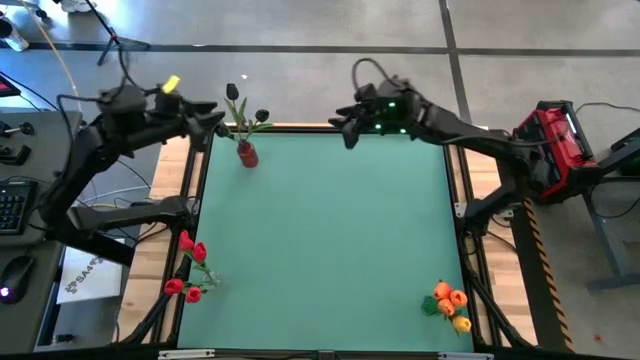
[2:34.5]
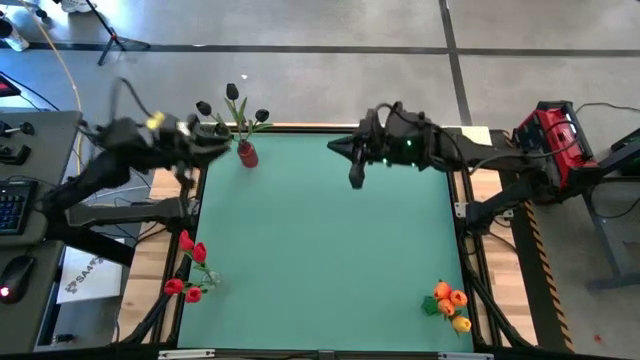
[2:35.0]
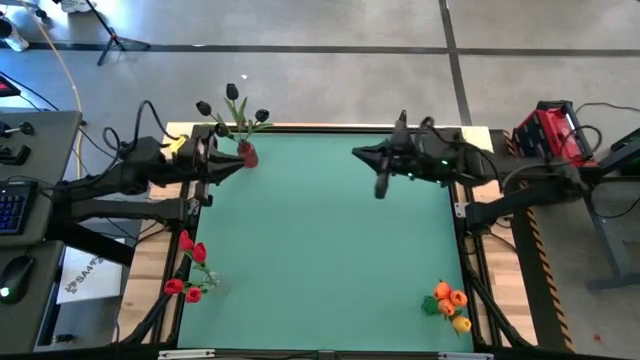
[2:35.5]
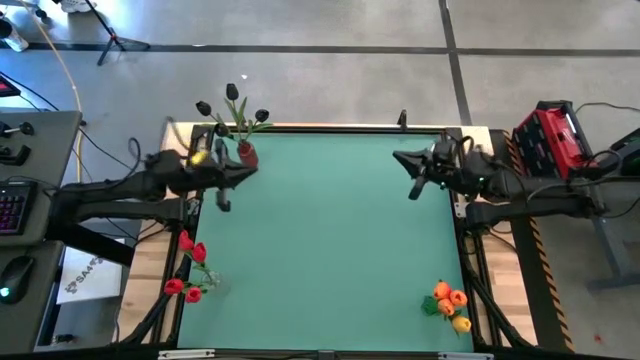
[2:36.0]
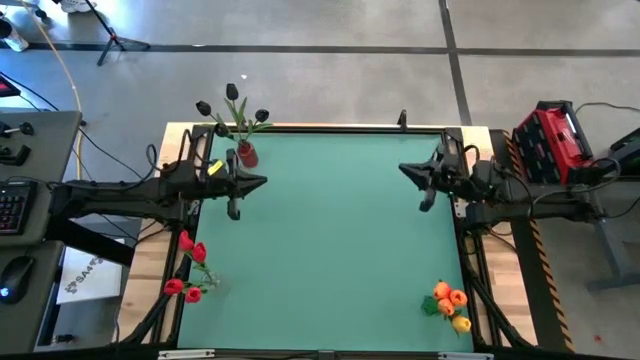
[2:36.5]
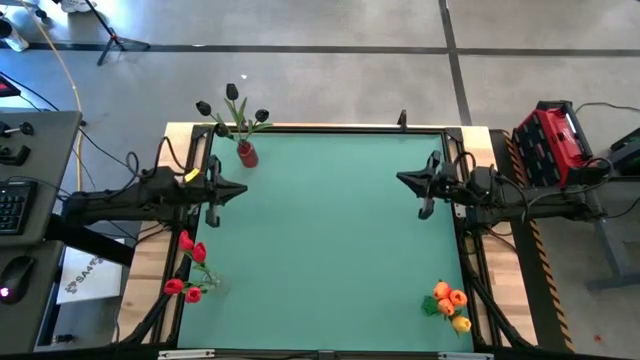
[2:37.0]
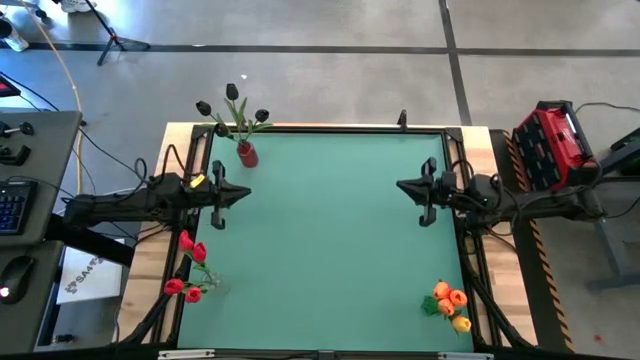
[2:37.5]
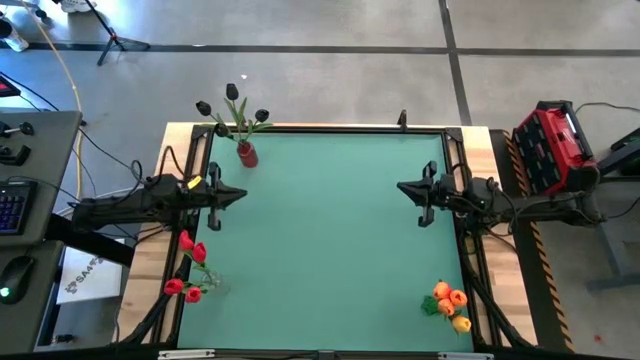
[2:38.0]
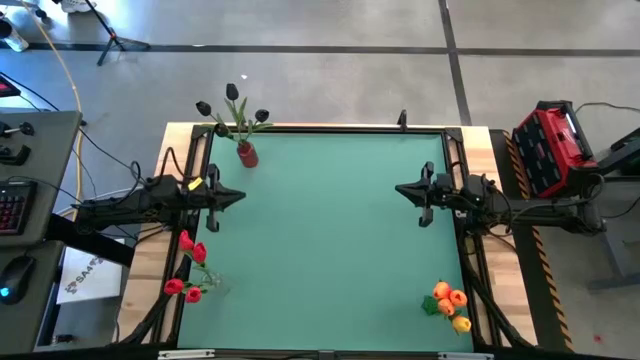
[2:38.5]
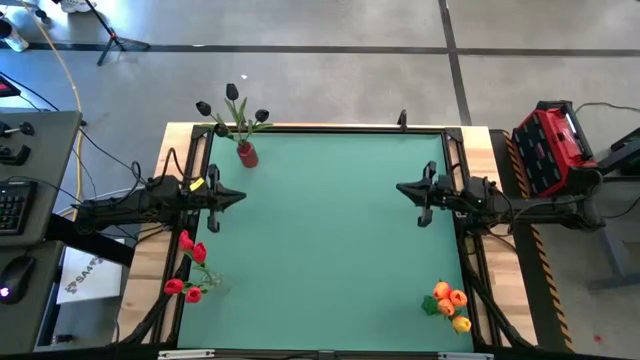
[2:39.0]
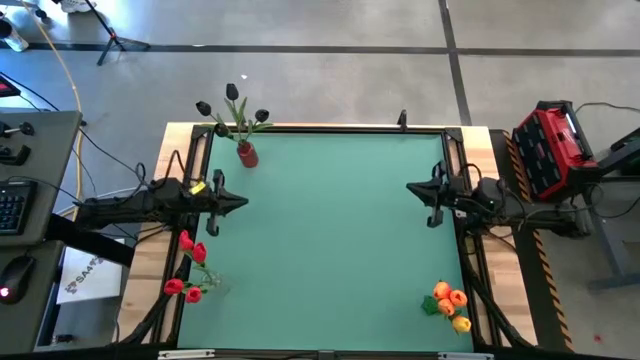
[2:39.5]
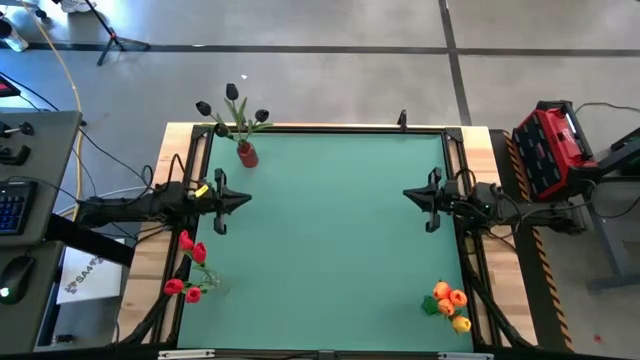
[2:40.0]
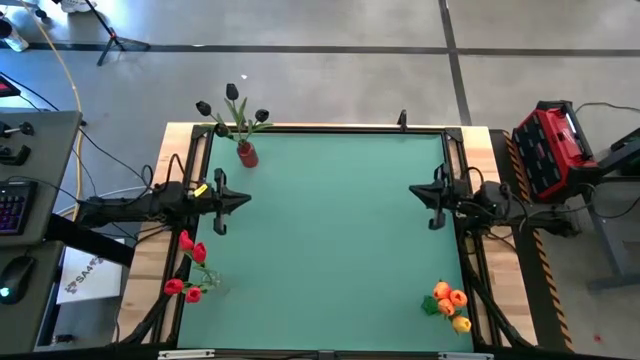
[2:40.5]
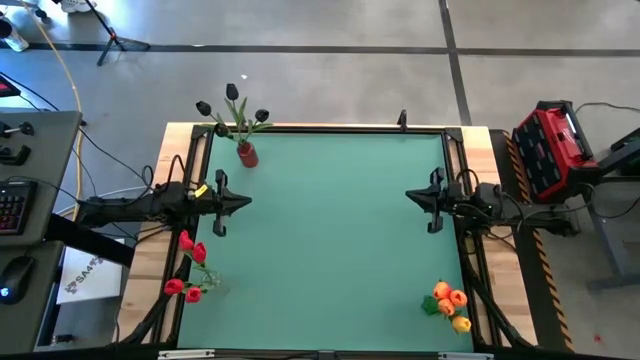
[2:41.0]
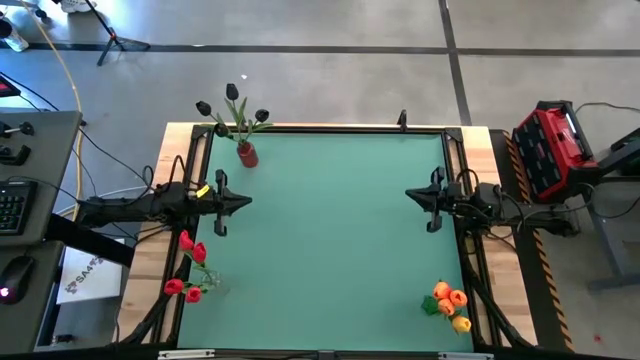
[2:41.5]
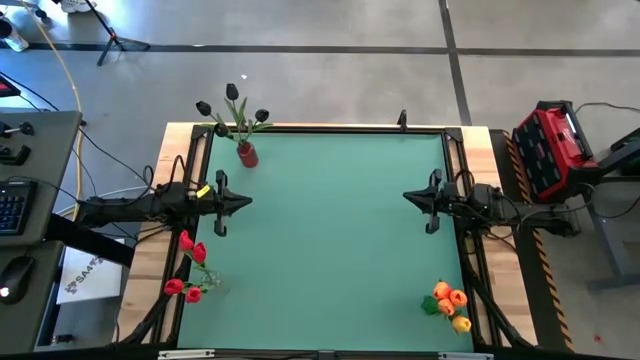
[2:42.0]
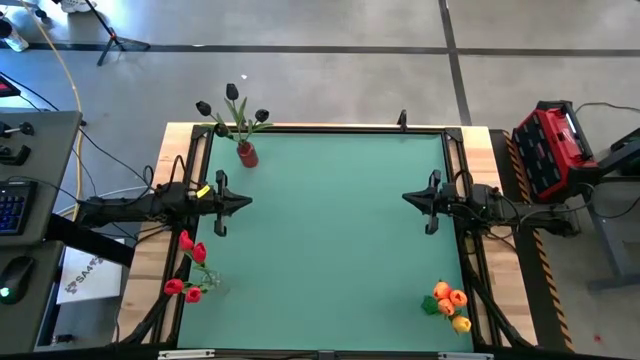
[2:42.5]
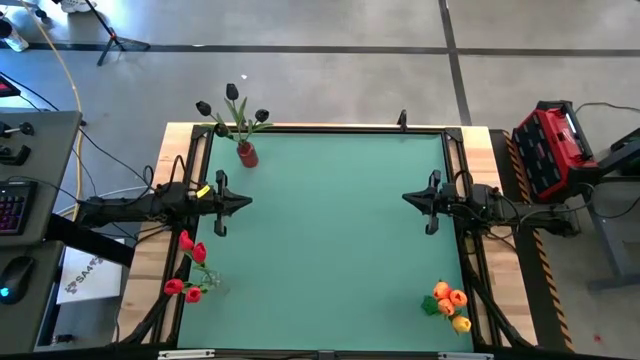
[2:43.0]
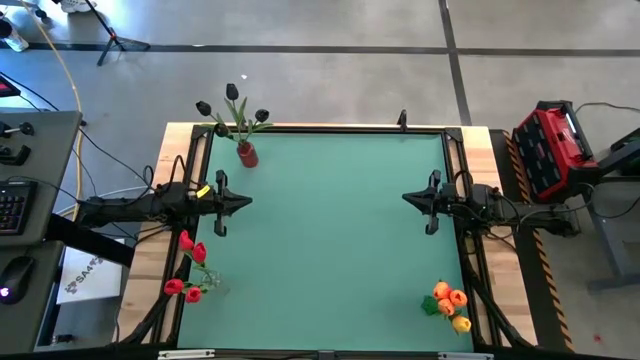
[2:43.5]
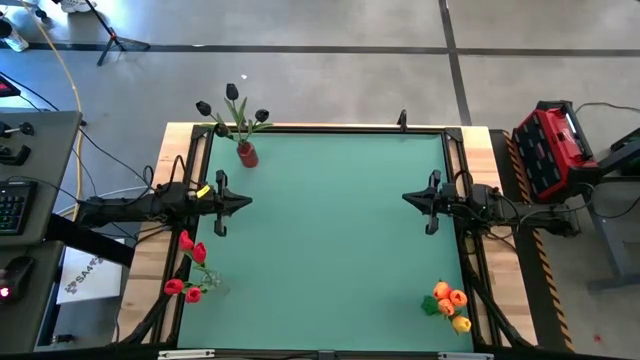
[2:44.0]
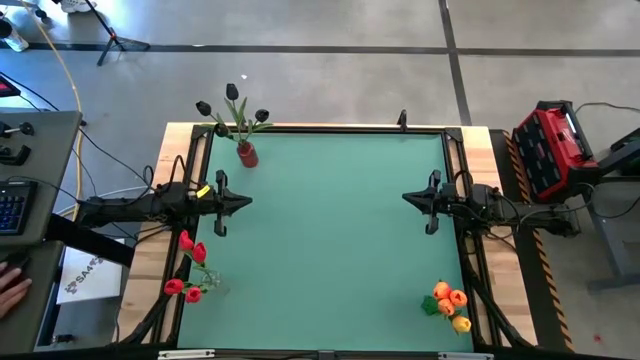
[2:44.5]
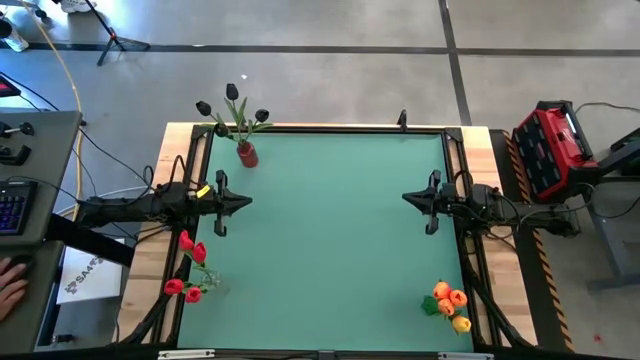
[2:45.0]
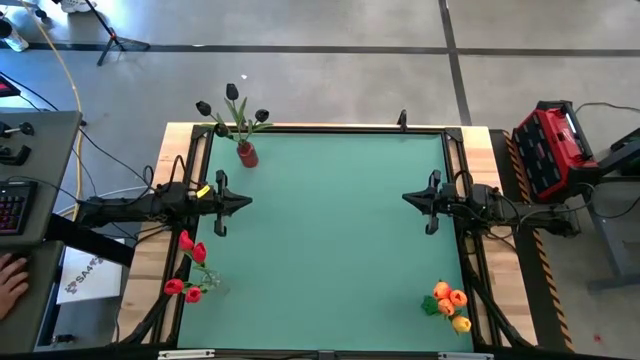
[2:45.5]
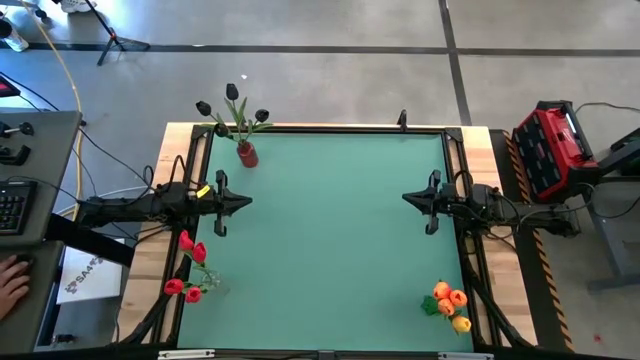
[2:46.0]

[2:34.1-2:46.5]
Task: Sort flowers into vase by color
Return to Home Position

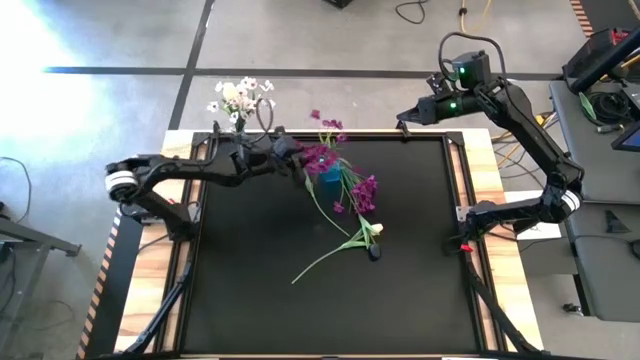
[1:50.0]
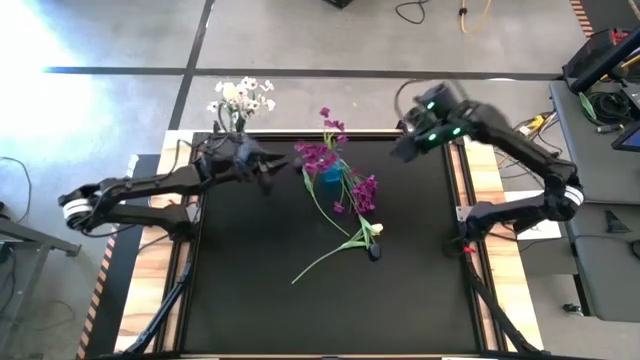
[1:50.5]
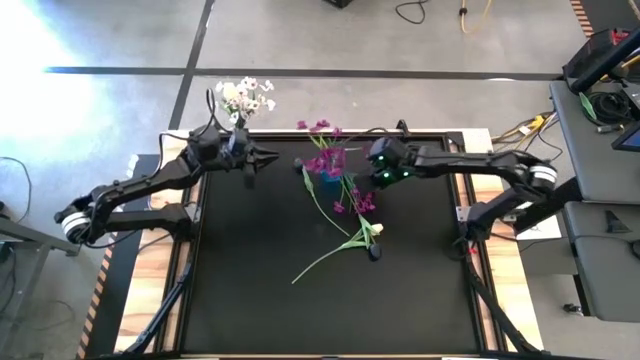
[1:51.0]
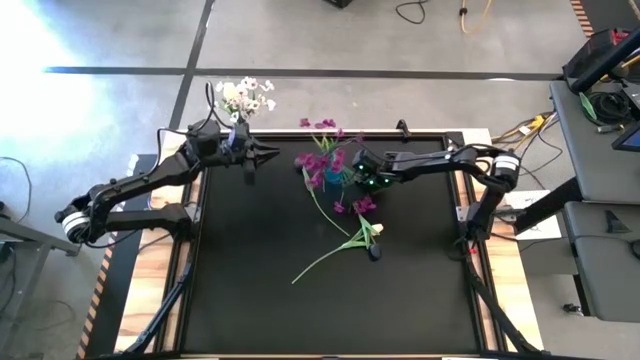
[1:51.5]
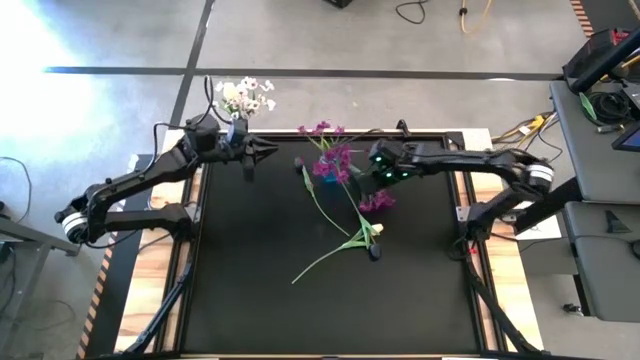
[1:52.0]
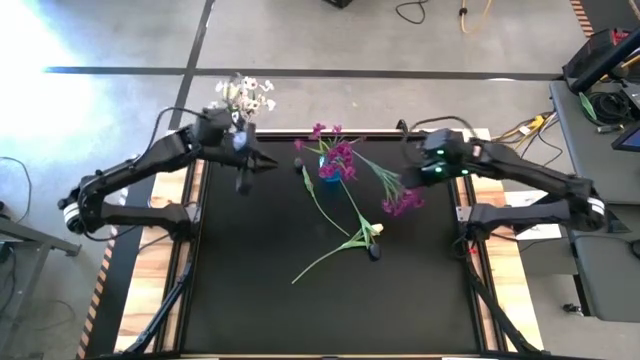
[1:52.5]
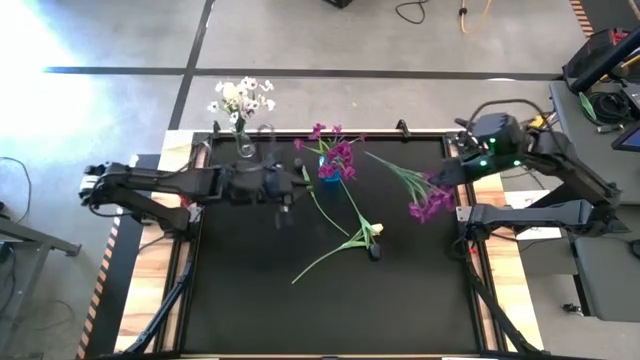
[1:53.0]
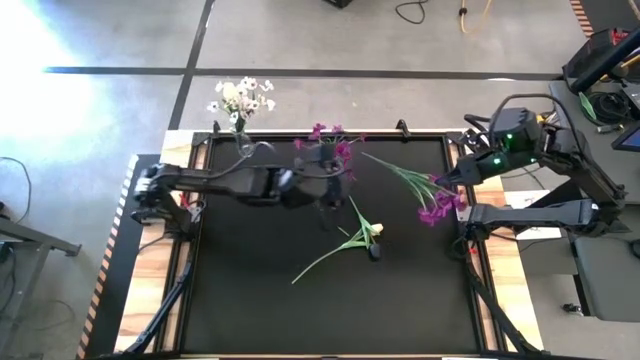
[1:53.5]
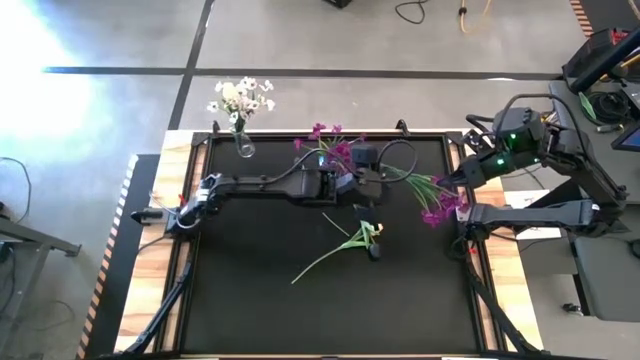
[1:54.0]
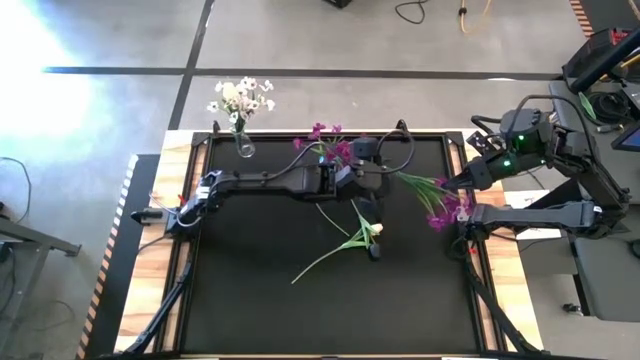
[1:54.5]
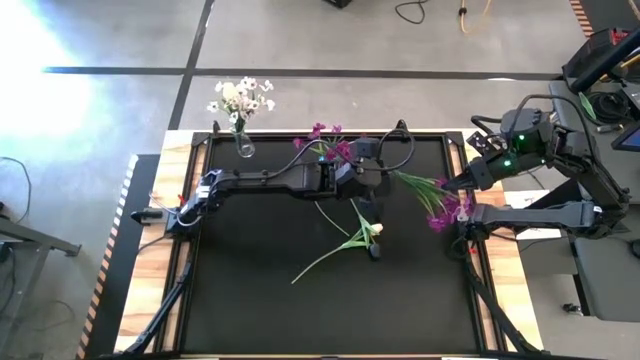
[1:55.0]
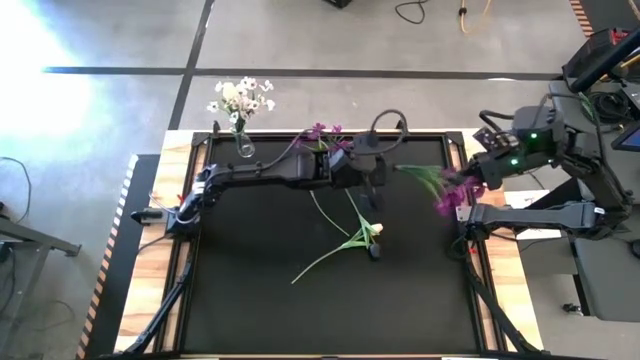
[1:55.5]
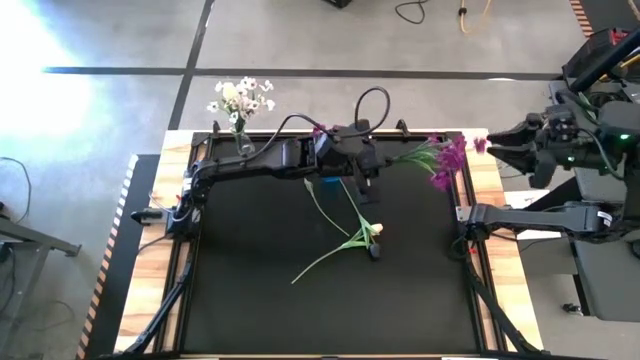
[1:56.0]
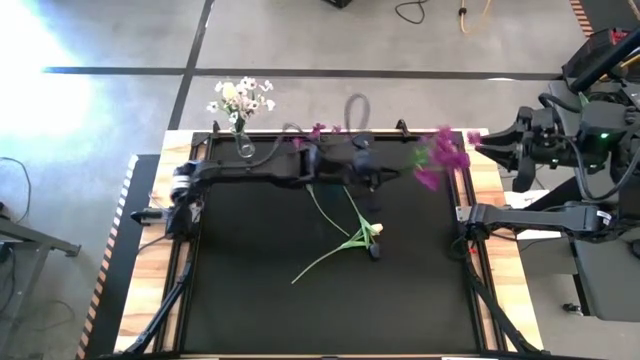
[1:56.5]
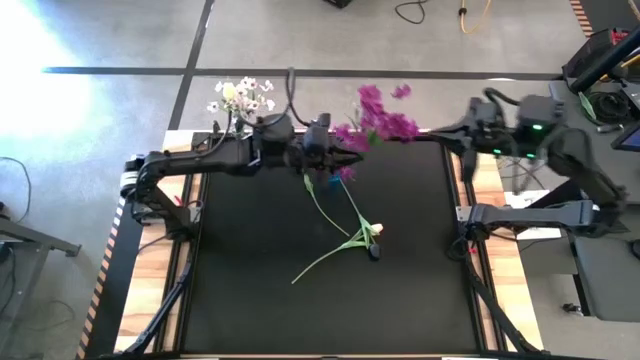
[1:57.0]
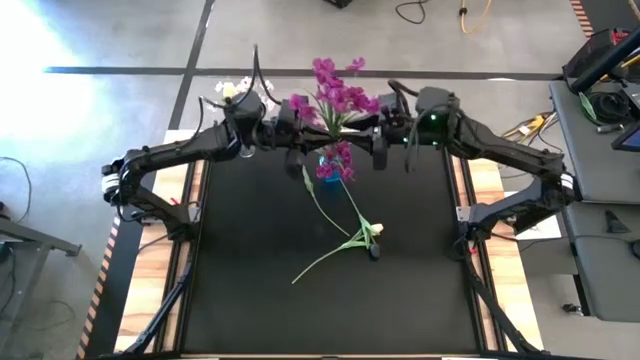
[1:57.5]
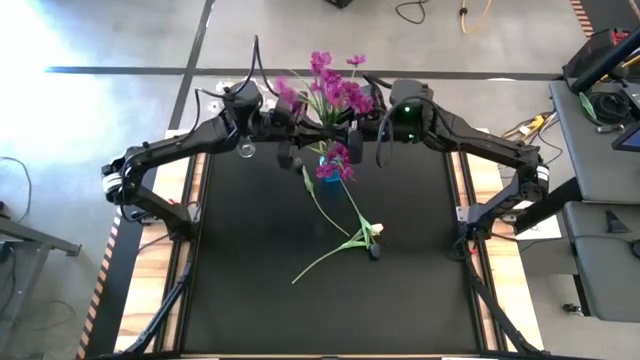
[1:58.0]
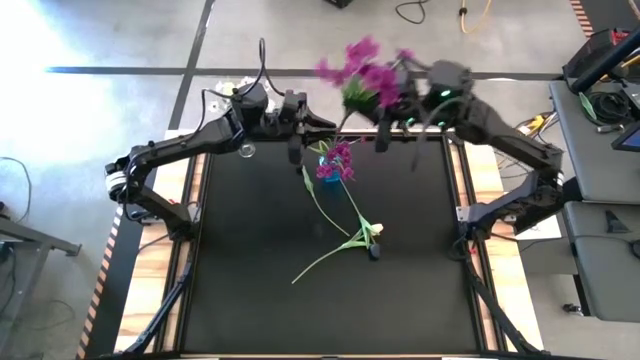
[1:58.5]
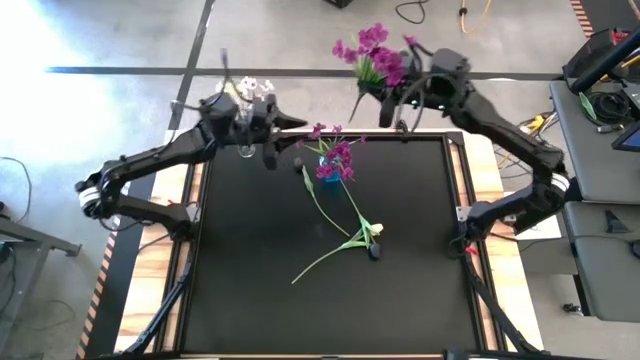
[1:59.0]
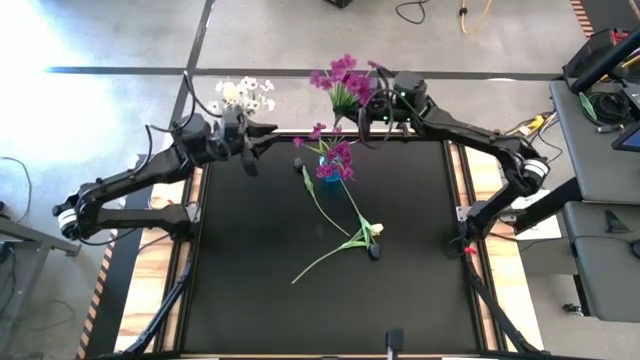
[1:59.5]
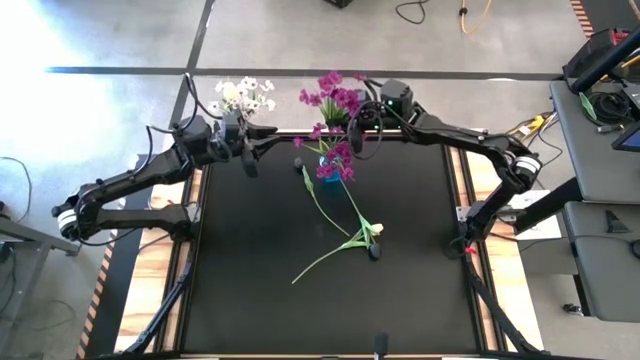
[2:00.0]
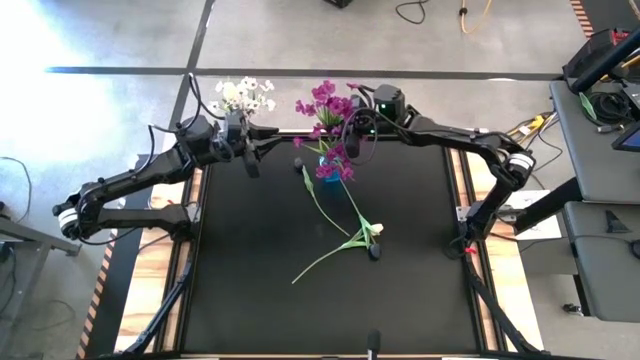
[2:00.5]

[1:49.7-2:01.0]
Task: Sort flowers into vase by color
Put the violet flowers into the blue vase
